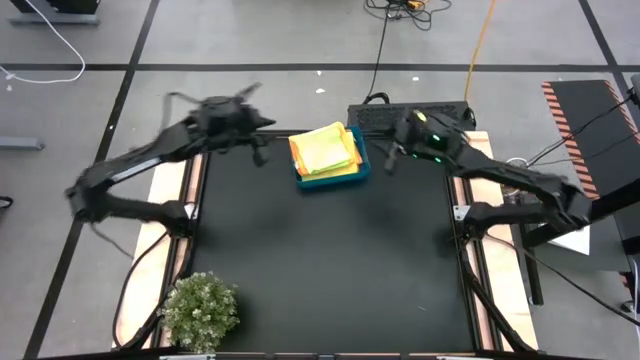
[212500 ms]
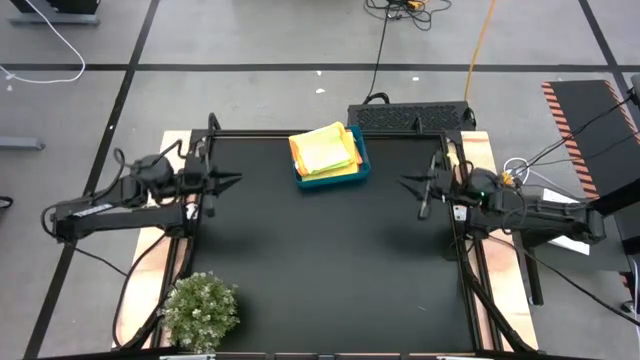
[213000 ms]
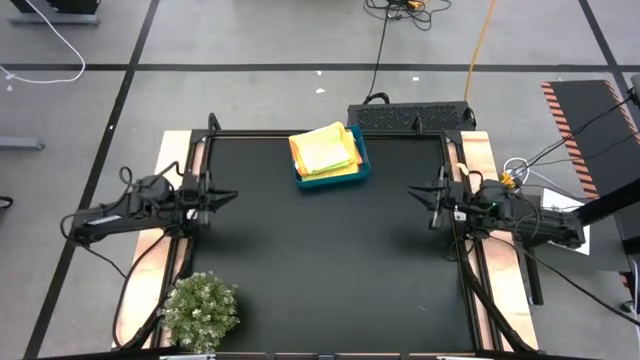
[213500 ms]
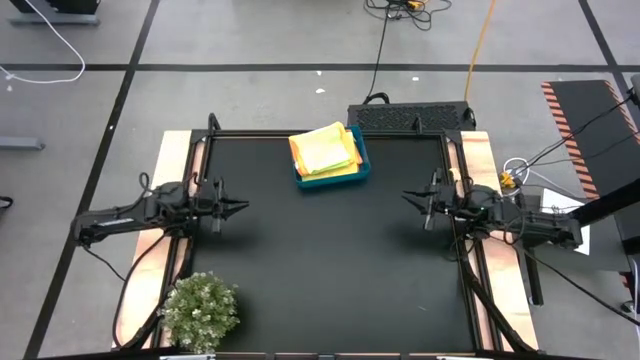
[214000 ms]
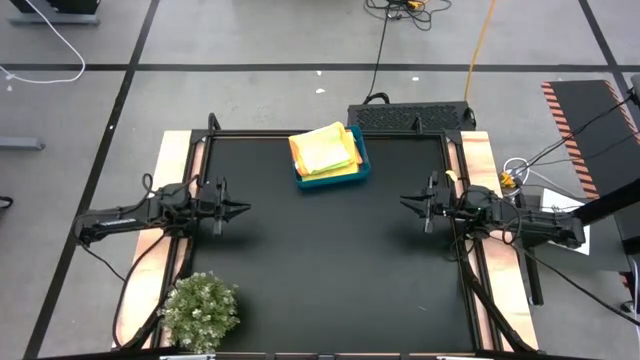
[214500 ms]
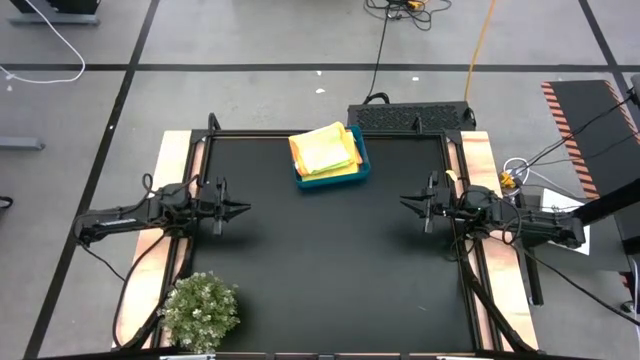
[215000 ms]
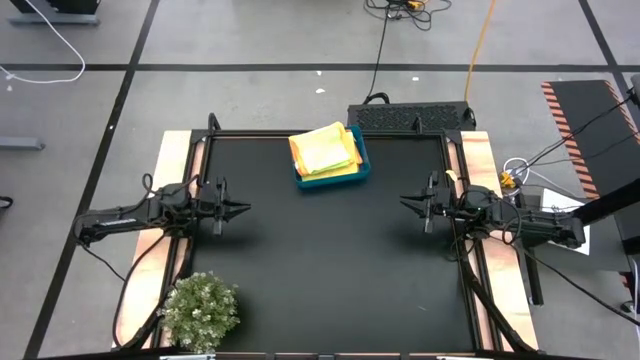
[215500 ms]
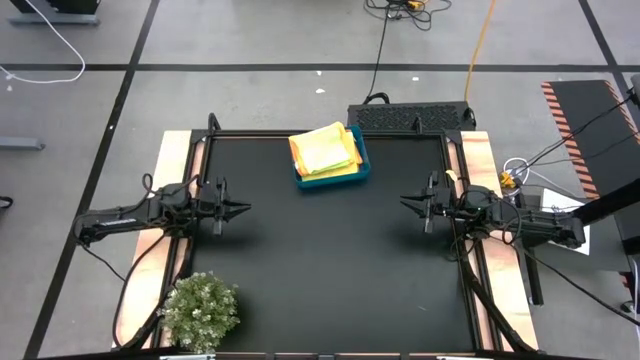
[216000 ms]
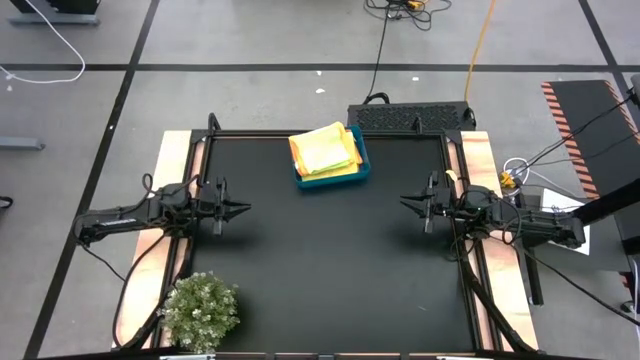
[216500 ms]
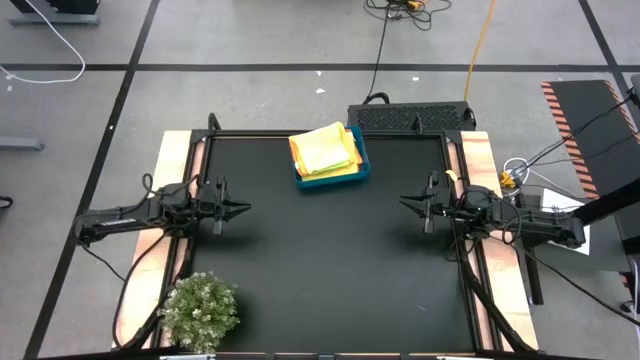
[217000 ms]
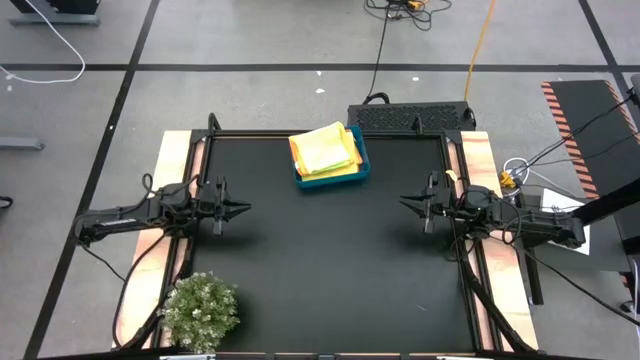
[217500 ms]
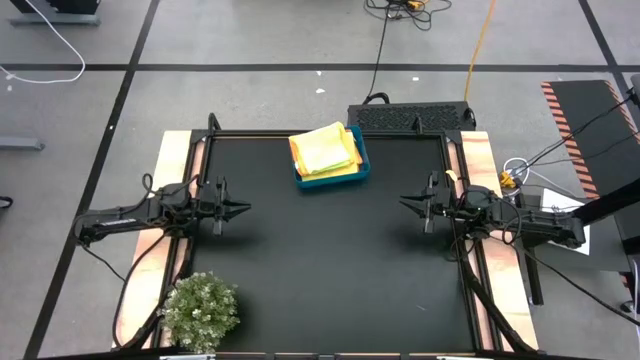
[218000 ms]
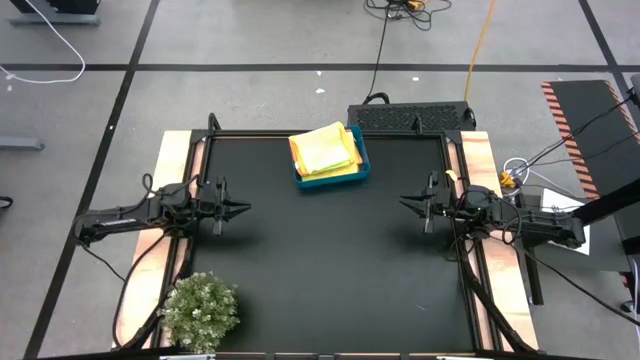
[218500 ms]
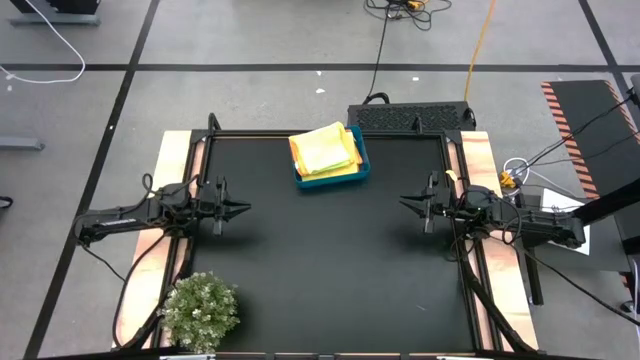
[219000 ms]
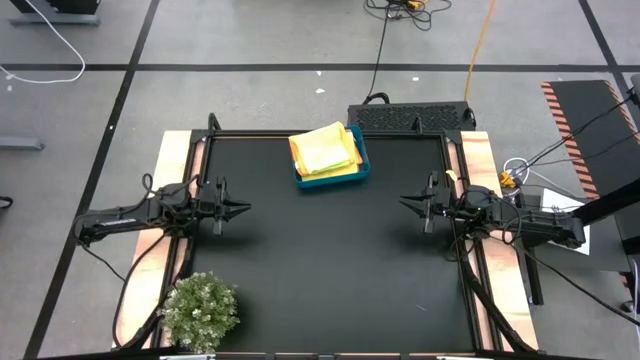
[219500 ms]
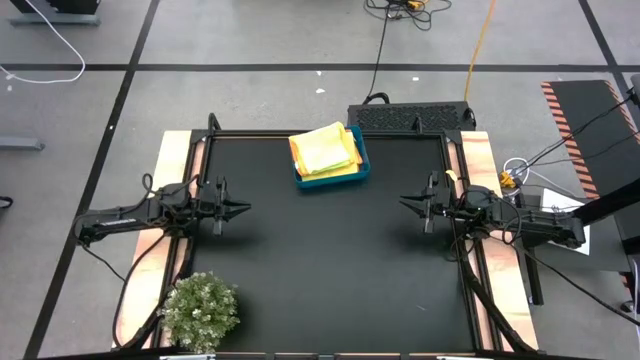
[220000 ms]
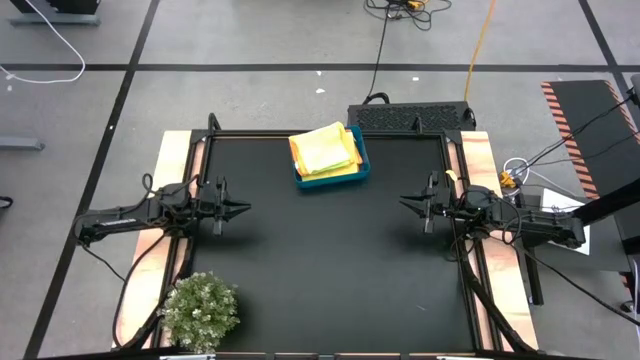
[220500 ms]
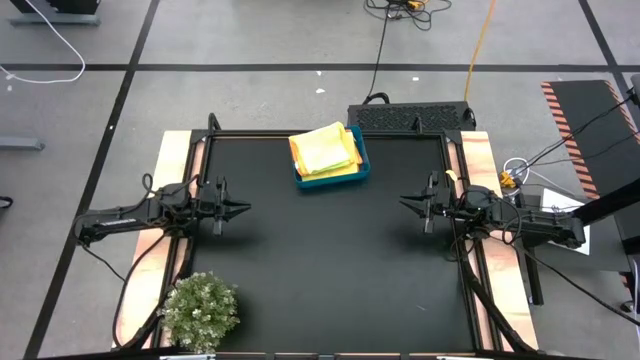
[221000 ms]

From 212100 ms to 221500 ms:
Task: Fold microfiber towels
Return to Home Position

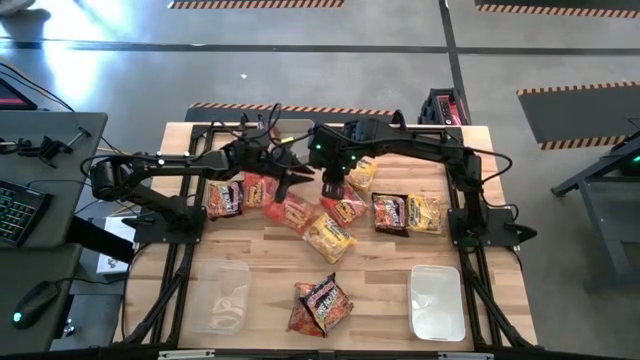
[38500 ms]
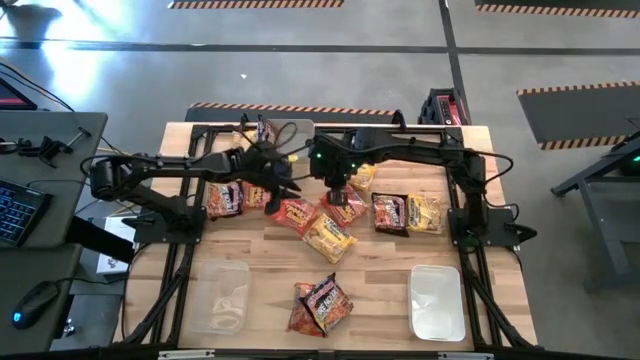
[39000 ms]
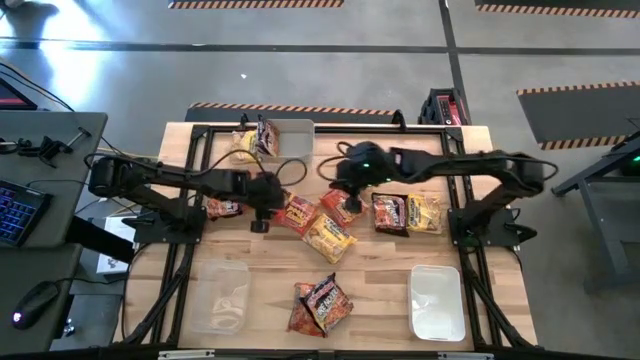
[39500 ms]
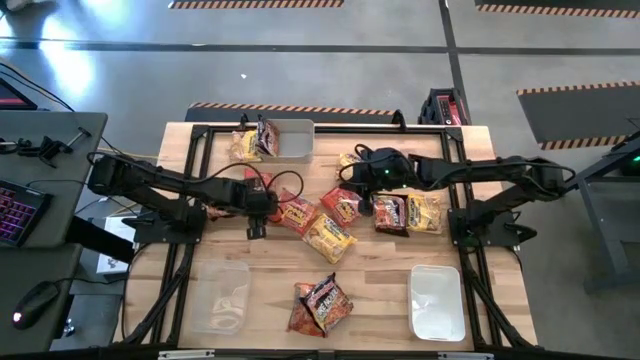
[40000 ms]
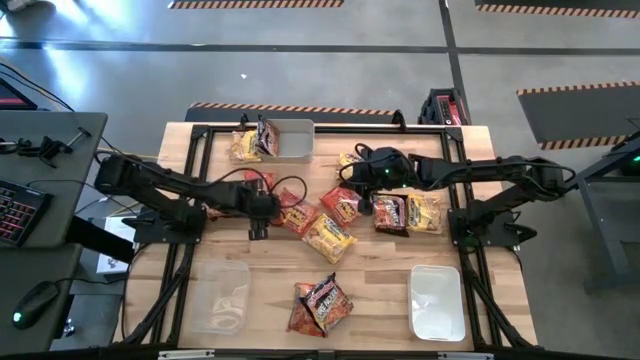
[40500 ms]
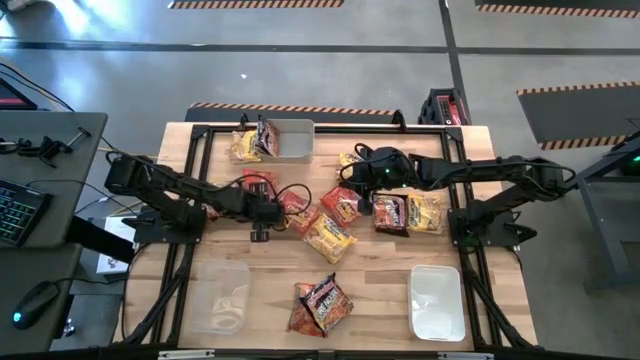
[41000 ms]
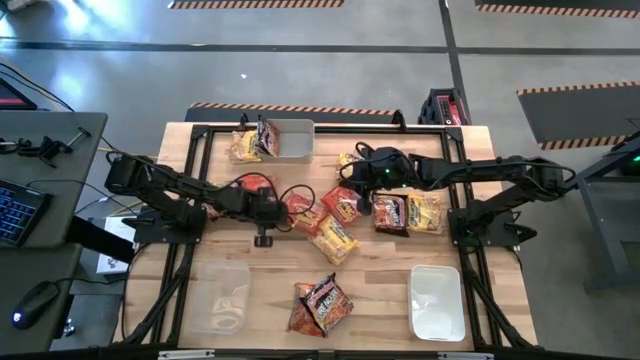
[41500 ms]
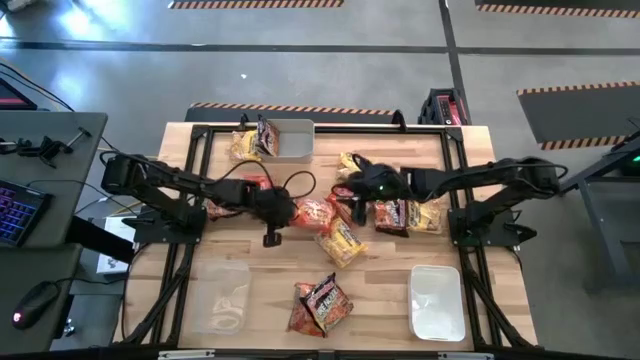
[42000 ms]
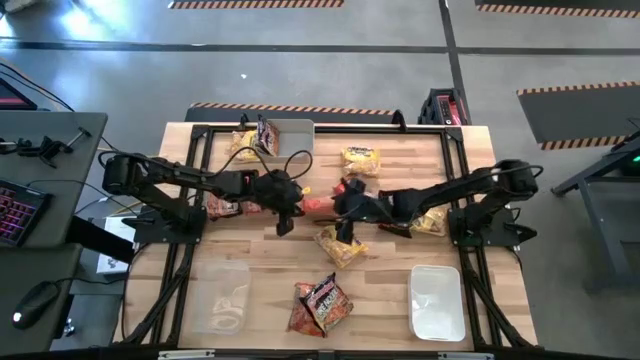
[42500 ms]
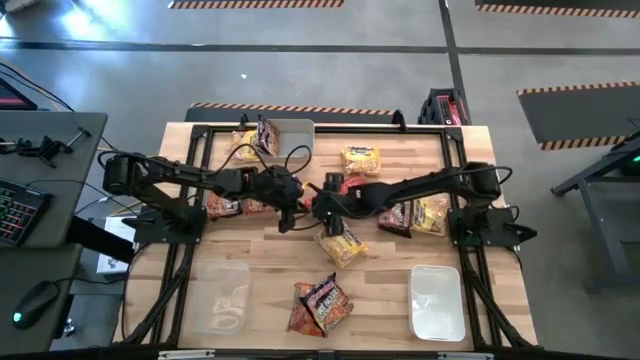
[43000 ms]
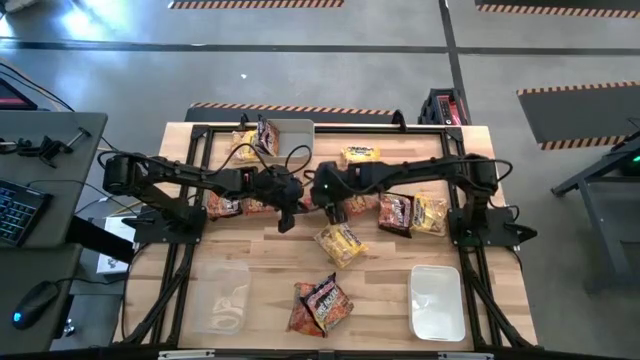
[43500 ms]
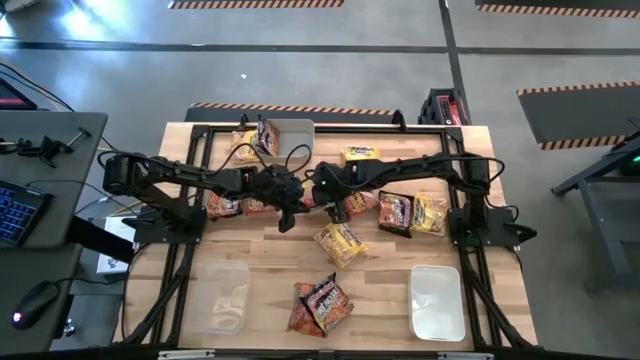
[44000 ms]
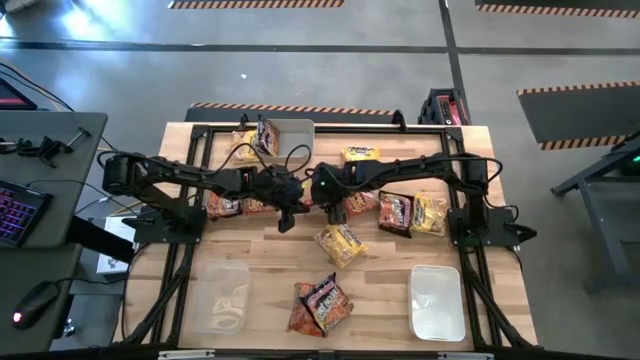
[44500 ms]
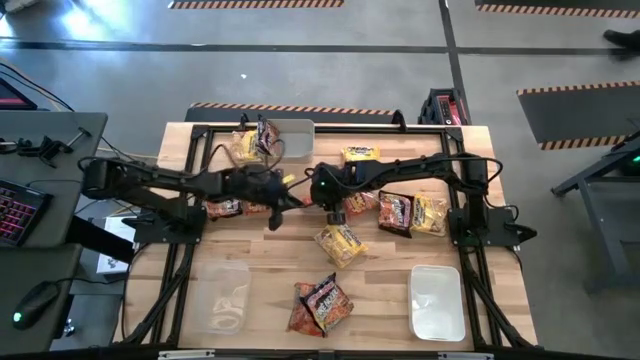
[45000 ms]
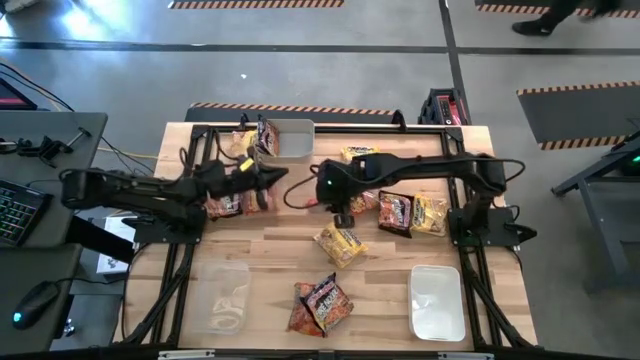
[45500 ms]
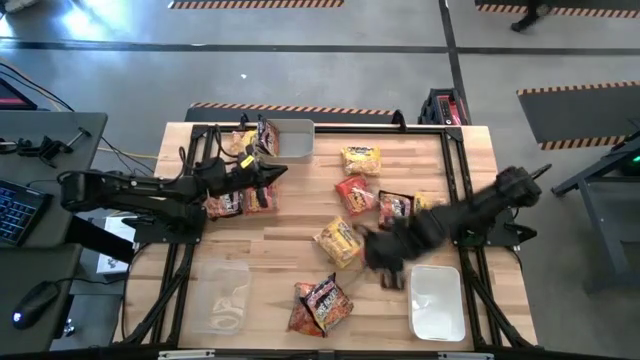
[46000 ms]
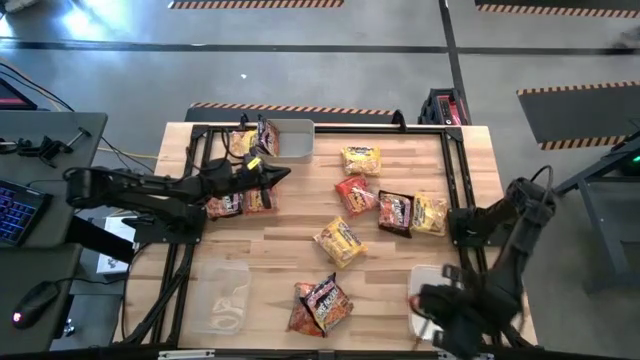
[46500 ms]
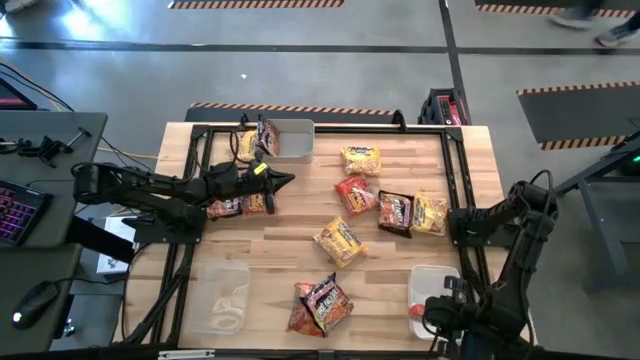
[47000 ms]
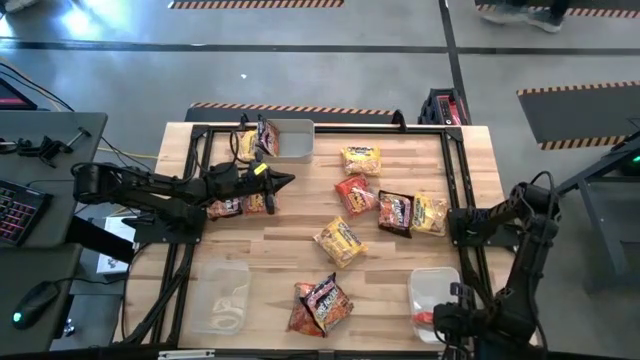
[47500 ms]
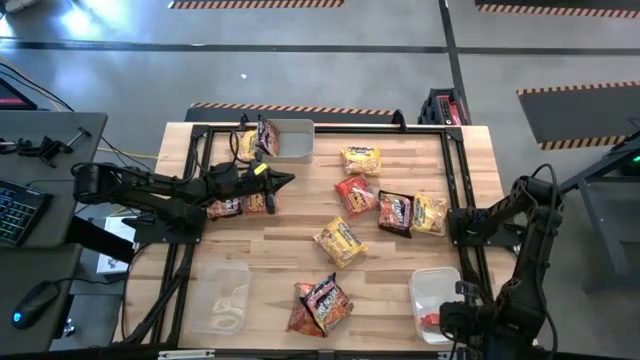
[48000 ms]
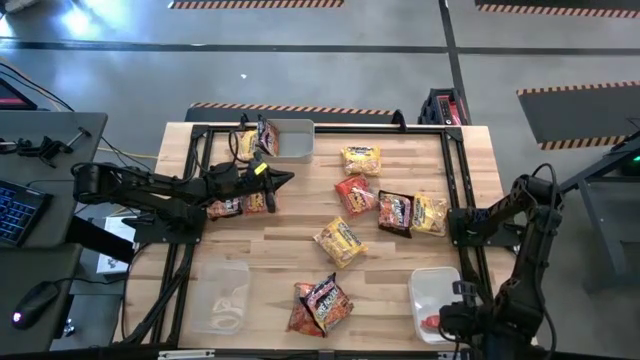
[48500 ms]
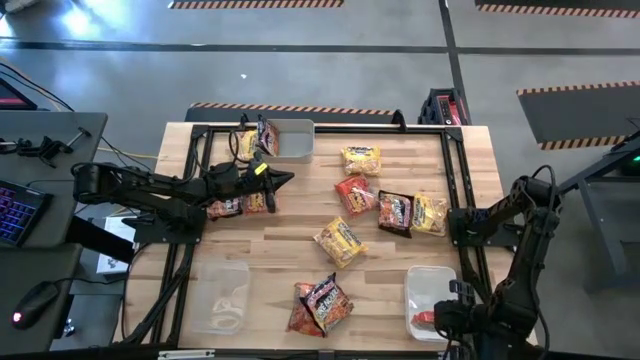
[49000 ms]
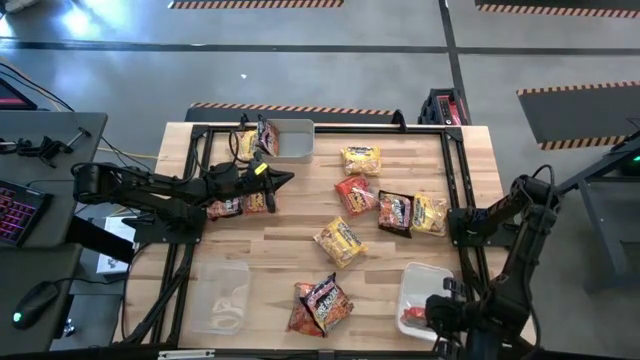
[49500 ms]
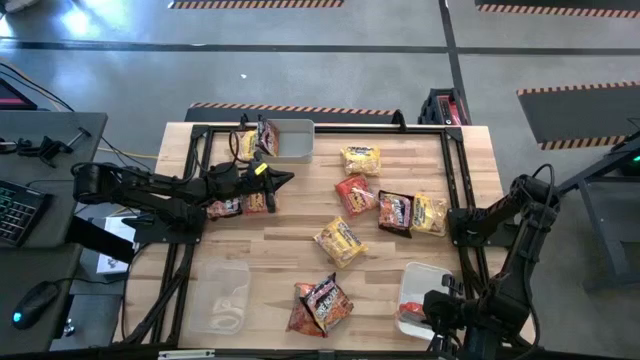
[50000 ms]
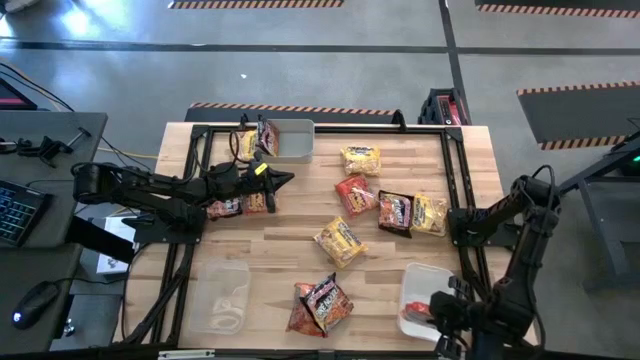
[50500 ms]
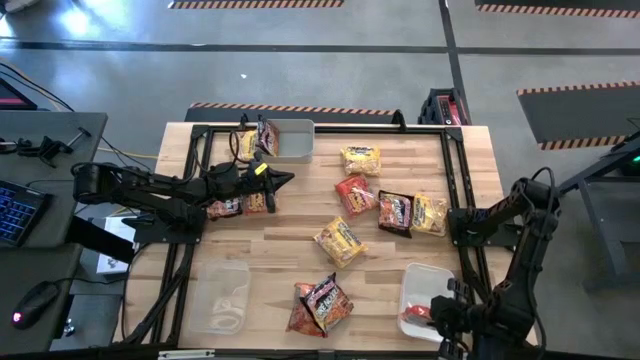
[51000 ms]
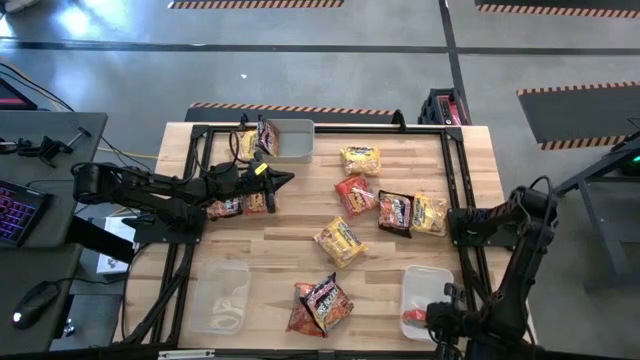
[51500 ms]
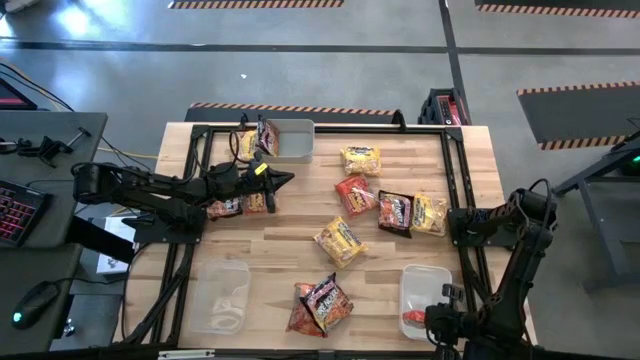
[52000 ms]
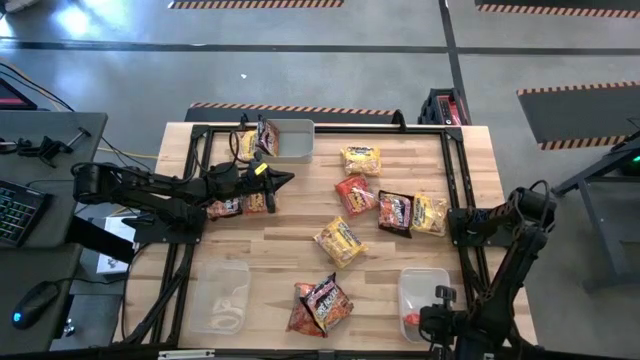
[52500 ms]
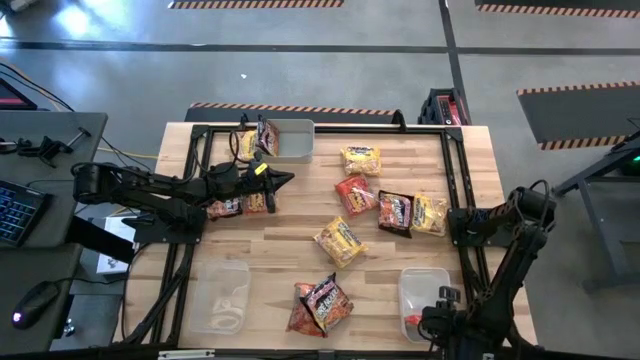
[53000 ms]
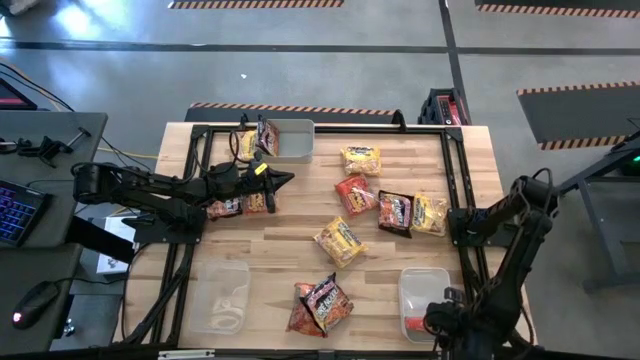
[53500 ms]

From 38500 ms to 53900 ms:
Task: Sort Maruchan noodles
Put the top middle orange noodle pack into the white bin
